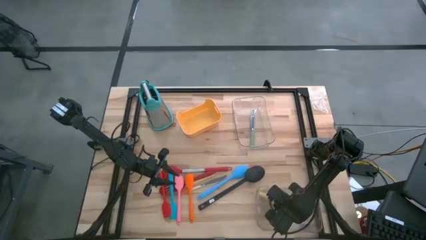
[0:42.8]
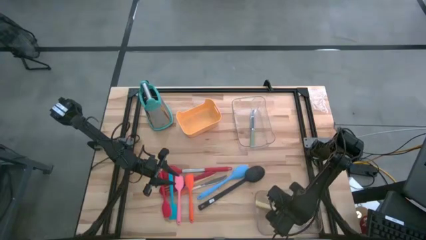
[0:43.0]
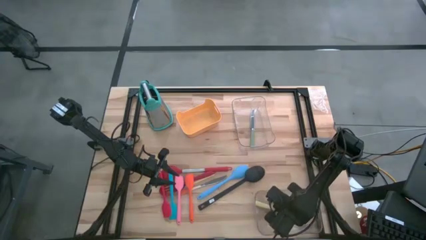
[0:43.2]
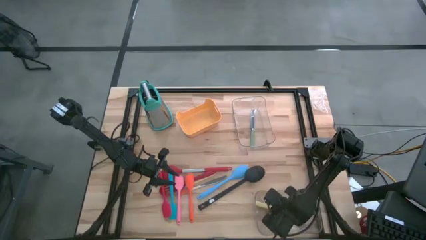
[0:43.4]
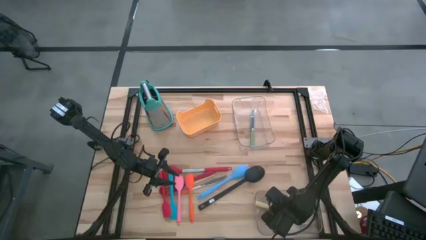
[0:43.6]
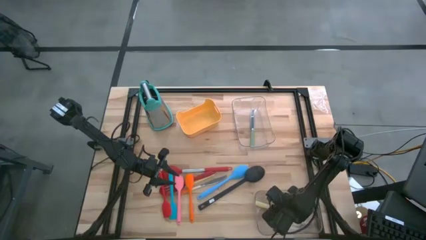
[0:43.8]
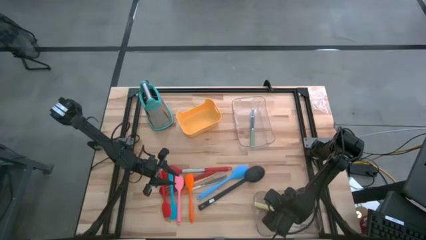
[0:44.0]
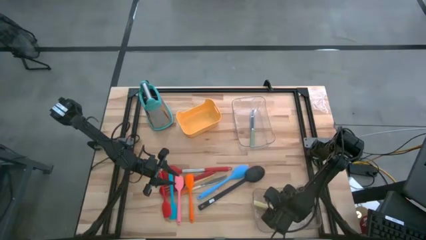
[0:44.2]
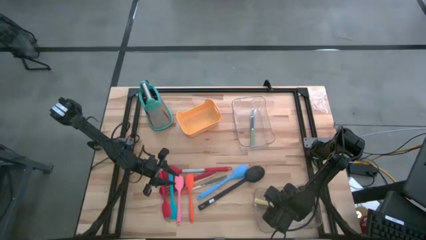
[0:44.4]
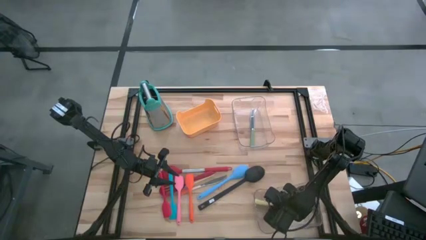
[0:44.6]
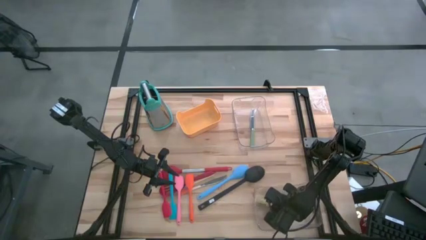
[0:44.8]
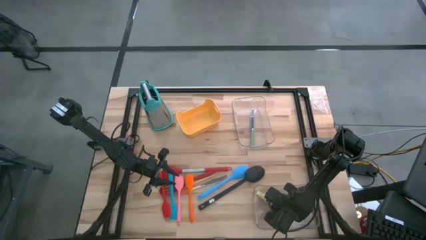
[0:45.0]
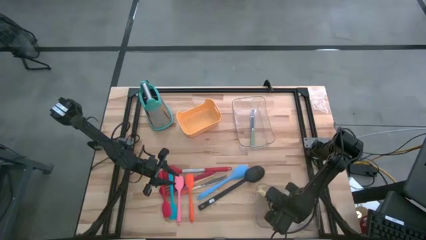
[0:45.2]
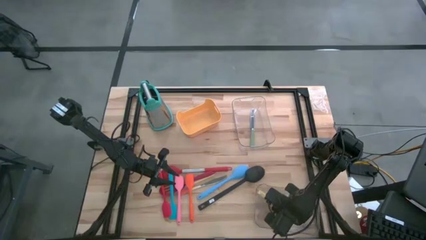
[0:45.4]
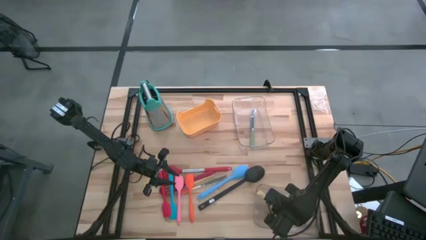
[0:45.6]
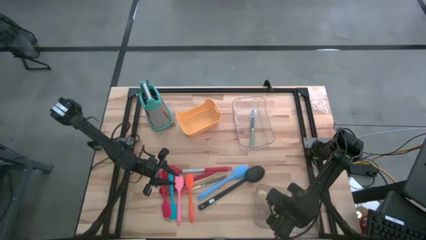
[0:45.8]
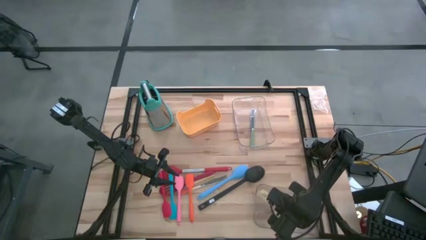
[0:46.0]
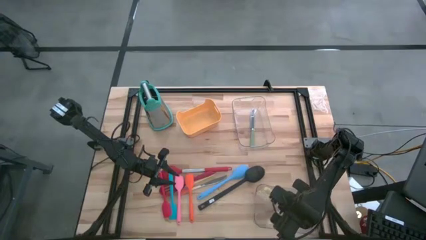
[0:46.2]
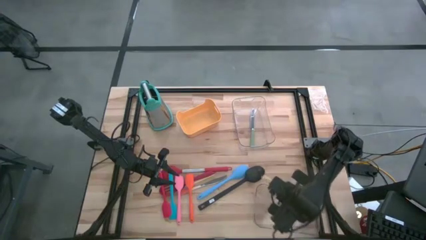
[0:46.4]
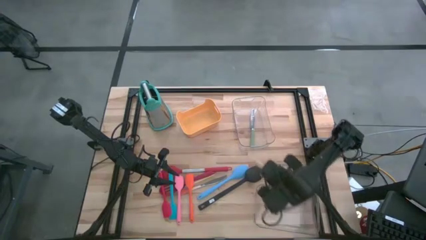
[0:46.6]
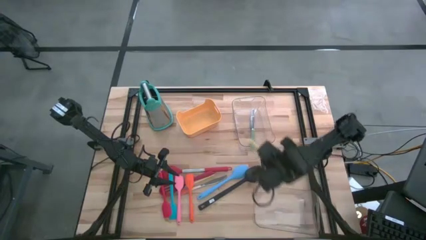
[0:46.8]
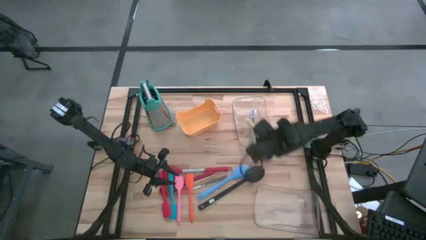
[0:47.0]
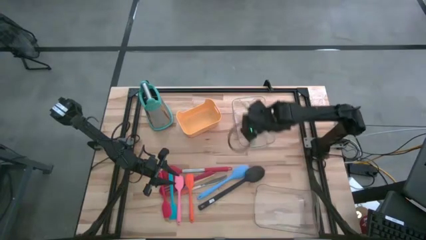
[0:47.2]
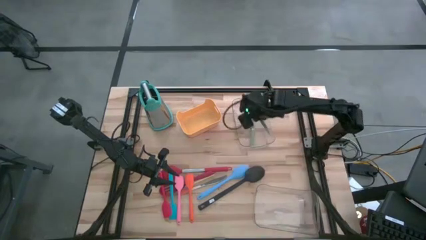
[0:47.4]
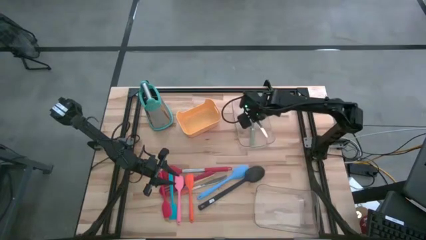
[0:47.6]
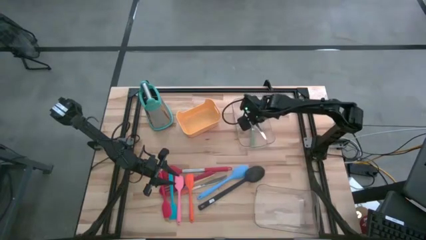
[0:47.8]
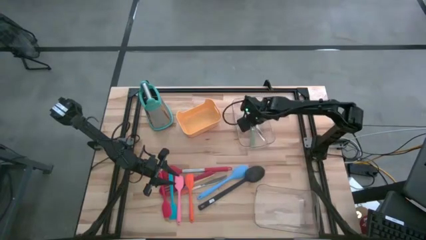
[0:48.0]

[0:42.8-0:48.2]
Task: Pick & Place Kitchen Items
Put the right yellow kitchen knife into the top transparent bin

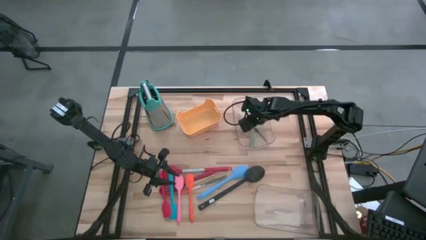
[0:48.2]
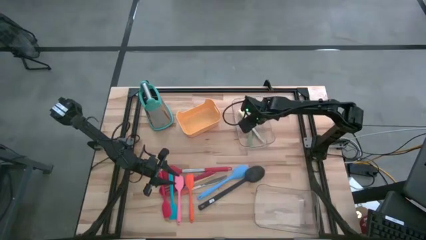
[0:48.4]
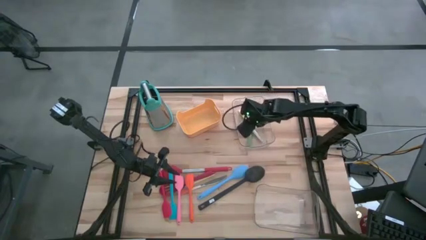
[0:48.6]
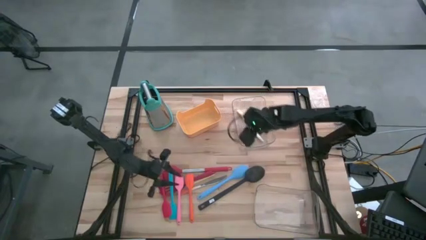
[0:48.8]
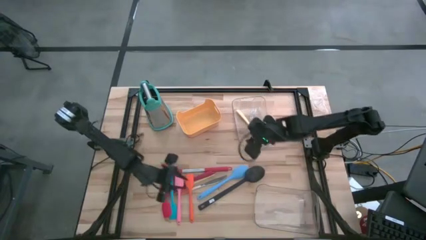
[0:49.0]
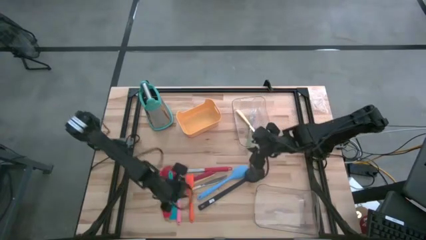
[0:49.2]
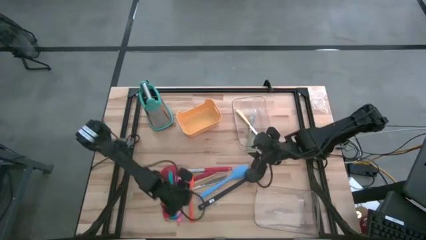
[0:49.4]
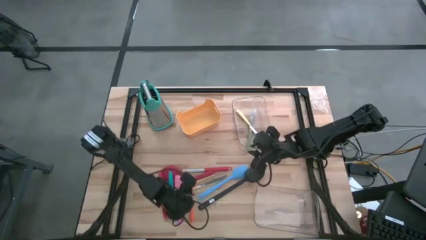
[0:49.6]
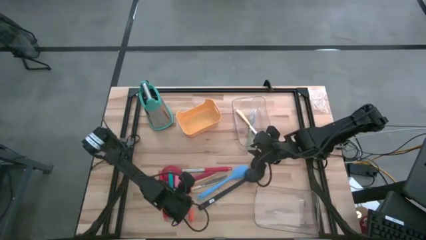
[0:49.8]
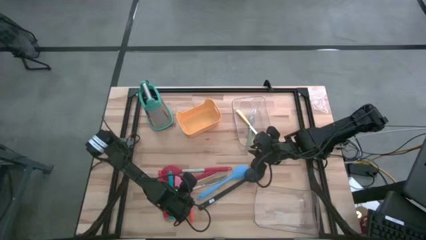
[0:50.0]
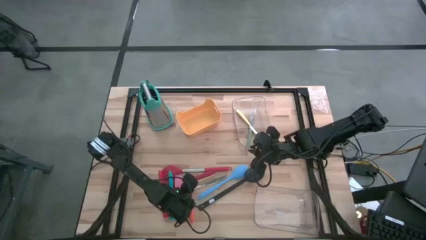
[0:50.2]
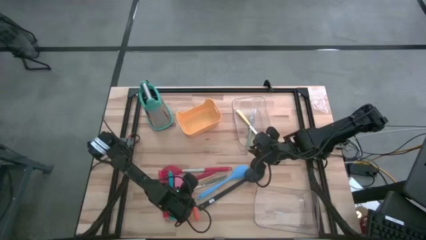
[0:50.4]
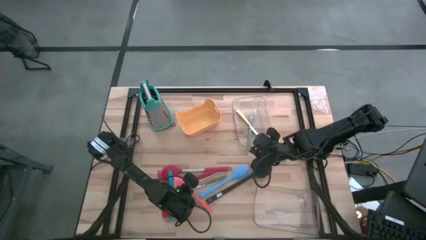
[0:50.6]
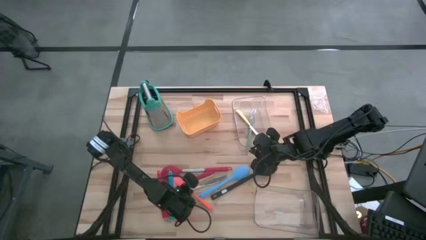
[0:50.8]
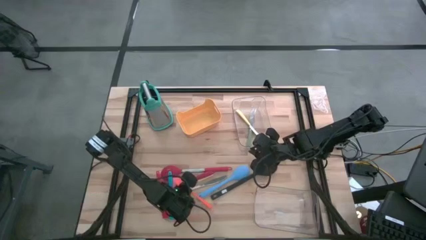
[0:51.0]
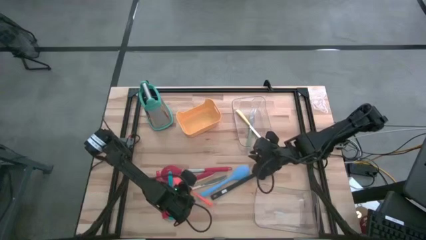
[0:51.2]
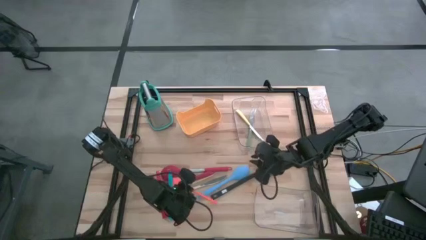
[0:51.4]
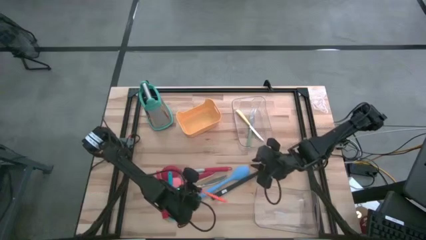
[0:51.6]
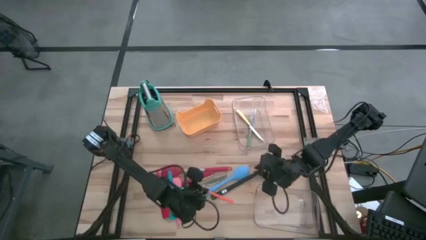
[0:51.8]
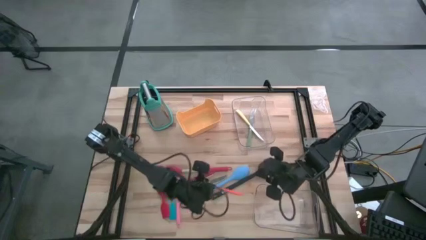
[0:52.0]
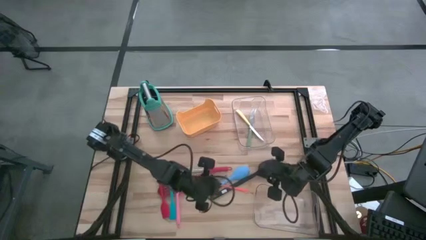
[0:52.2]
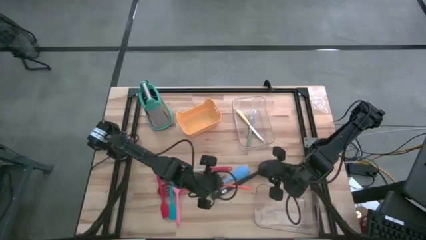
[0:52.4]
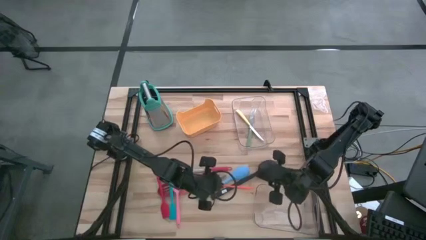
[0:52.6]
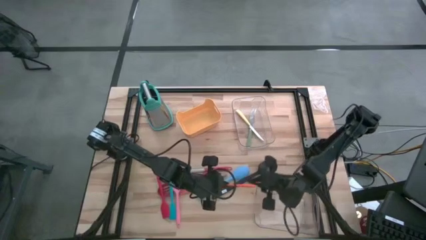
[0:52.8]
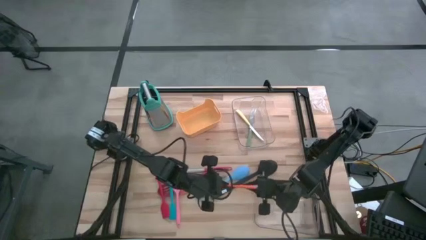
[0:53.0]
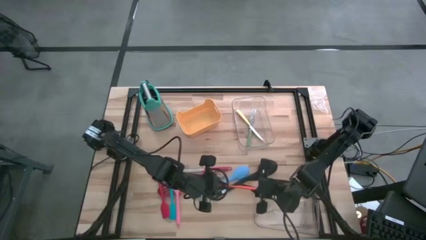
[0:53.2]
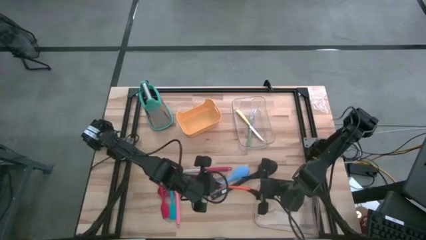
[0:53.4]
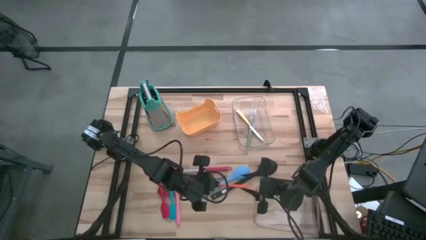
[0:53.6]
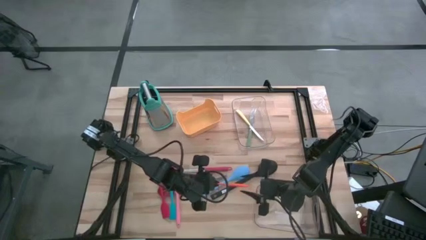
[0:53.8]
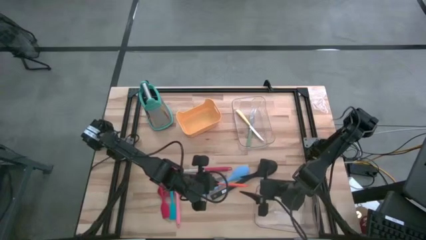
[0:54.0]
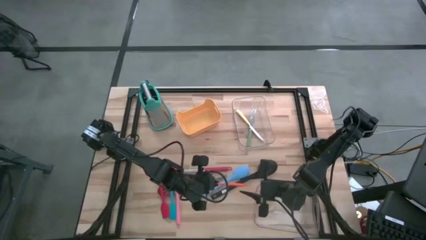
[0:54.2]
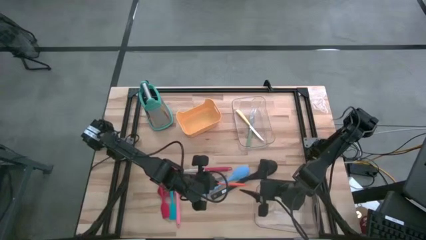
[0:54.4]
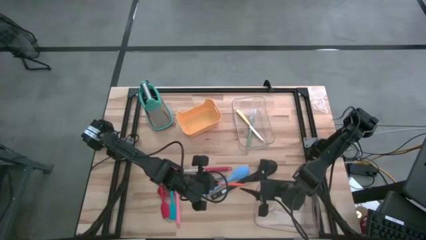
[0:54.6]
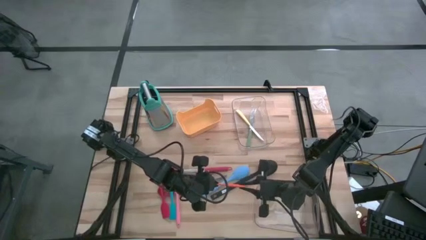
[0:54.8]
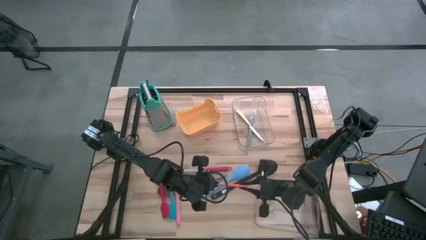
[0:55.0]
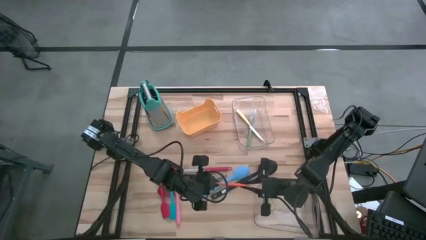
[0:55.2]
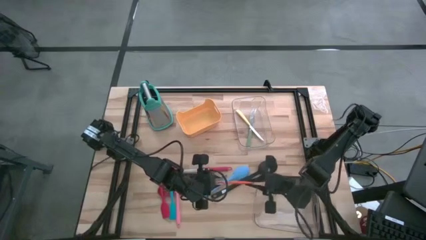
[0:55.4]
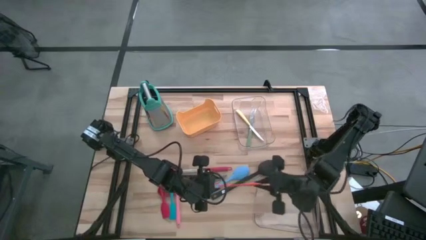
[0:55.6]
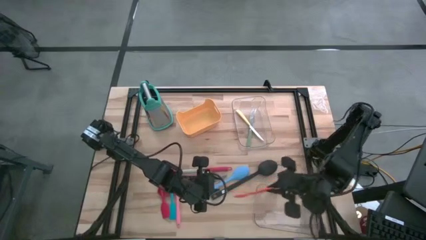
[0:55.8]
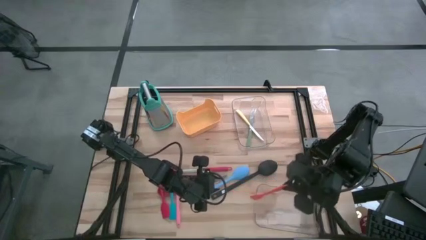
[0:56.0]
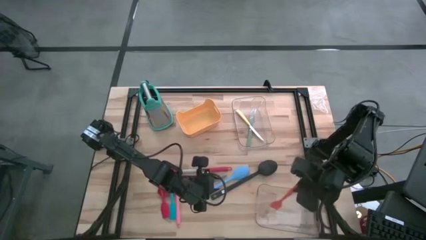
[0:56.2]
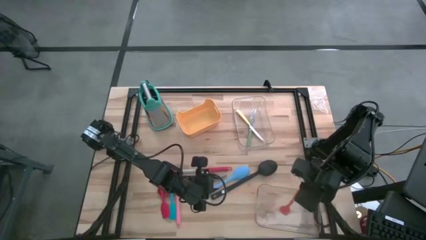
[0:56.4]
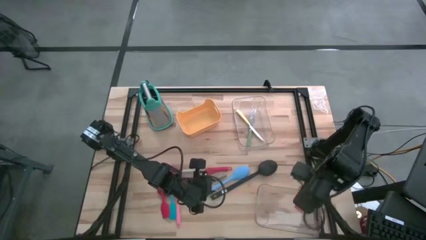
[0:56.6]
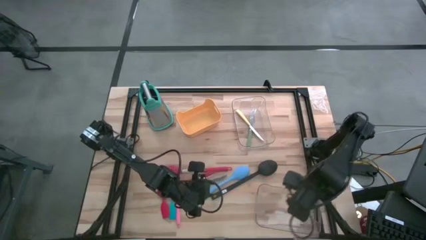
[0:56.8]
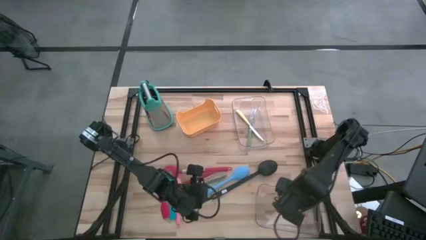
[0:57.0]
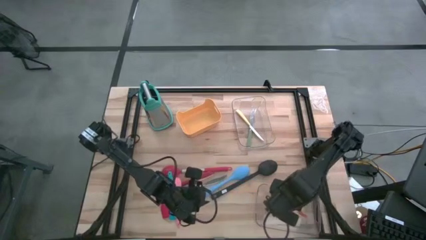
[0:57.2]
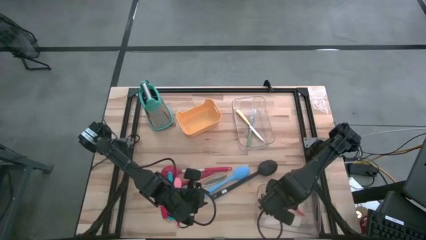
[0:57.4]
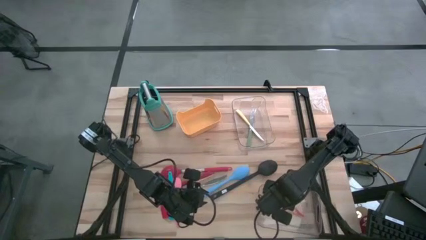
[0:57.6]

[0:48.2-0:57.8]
Put the orange spatula into the bottom transparent bin
